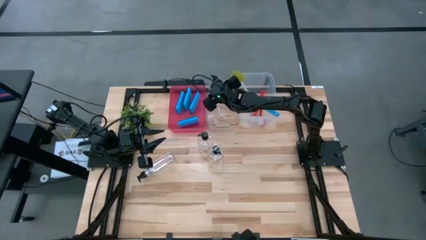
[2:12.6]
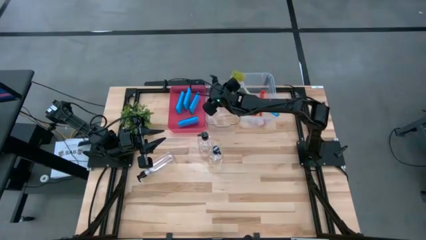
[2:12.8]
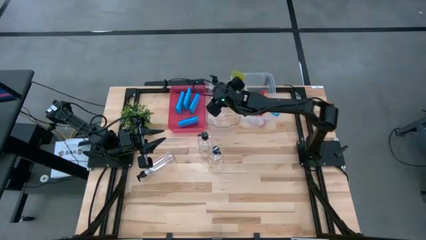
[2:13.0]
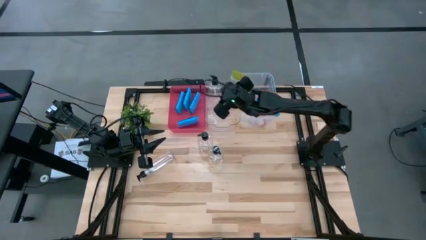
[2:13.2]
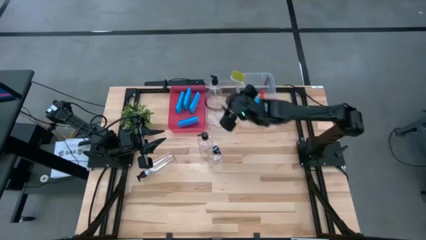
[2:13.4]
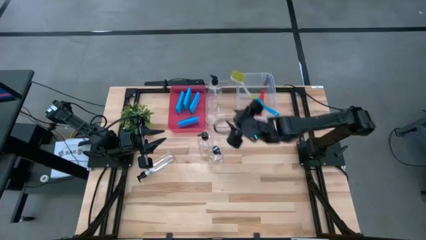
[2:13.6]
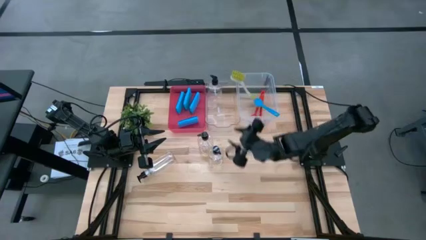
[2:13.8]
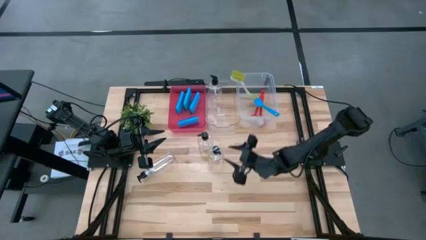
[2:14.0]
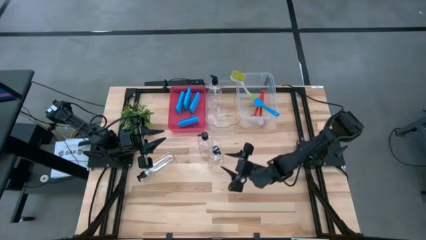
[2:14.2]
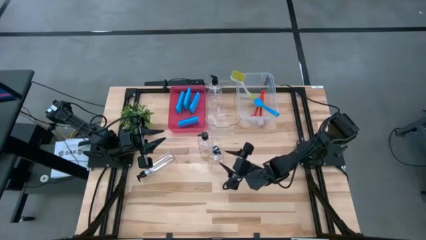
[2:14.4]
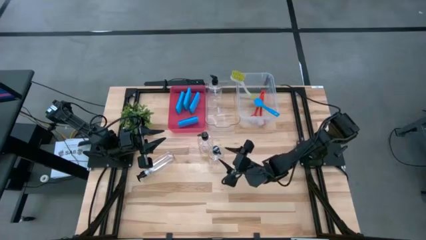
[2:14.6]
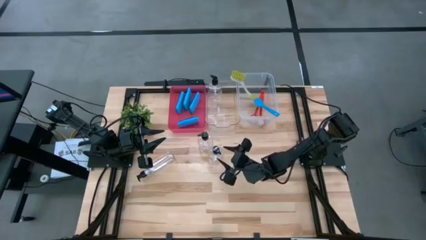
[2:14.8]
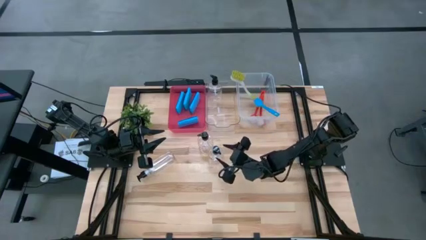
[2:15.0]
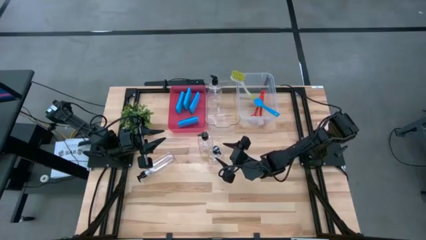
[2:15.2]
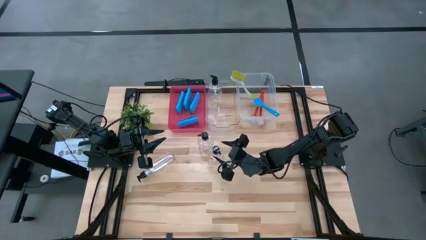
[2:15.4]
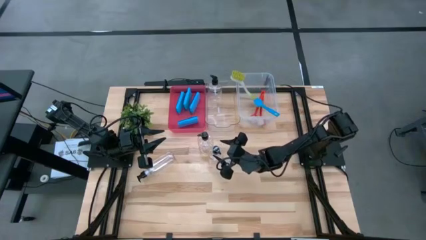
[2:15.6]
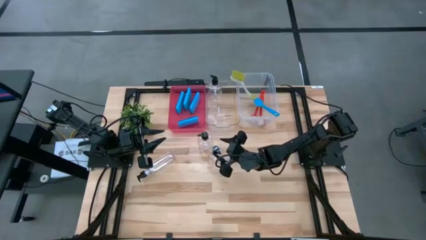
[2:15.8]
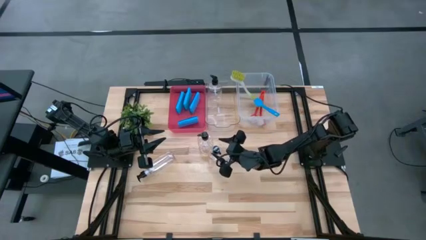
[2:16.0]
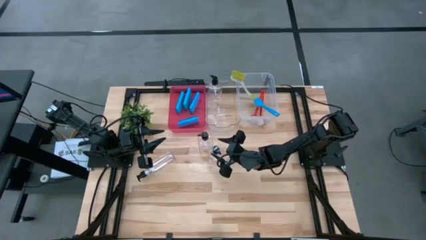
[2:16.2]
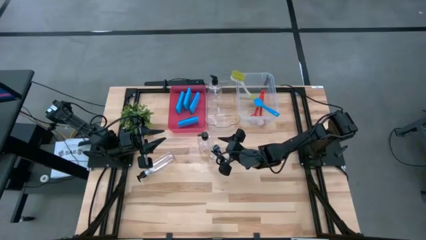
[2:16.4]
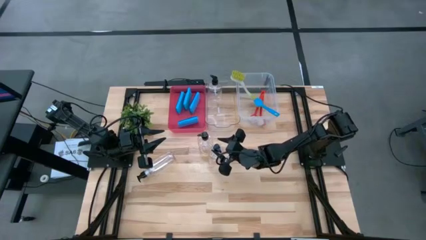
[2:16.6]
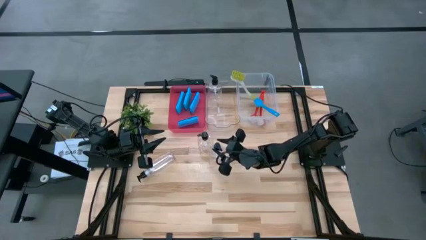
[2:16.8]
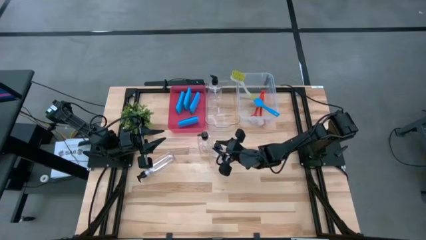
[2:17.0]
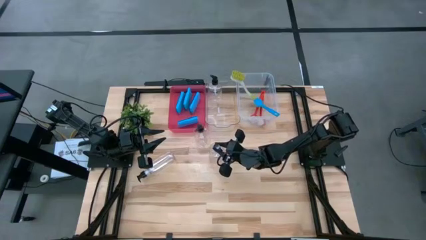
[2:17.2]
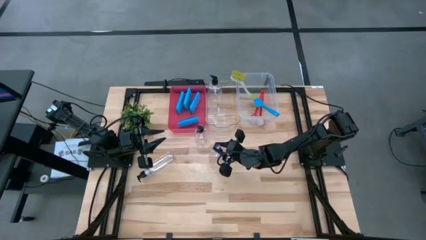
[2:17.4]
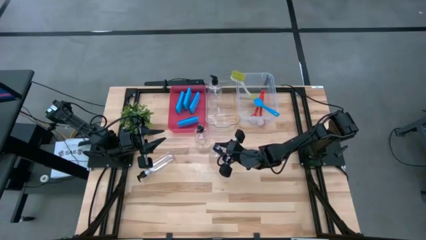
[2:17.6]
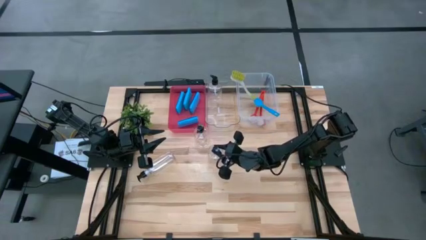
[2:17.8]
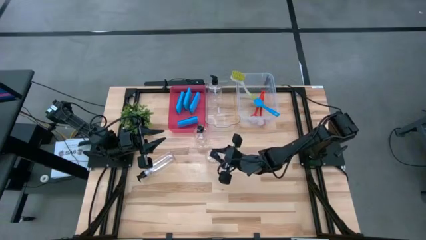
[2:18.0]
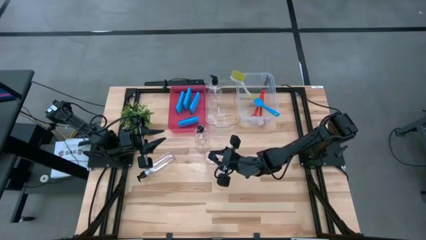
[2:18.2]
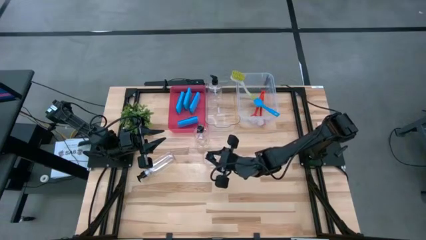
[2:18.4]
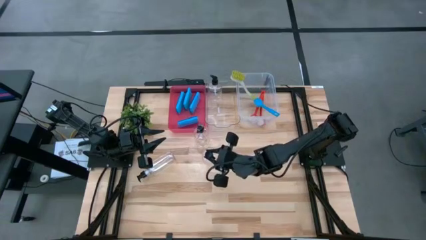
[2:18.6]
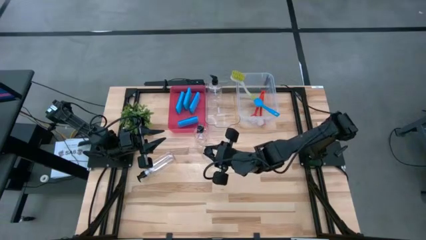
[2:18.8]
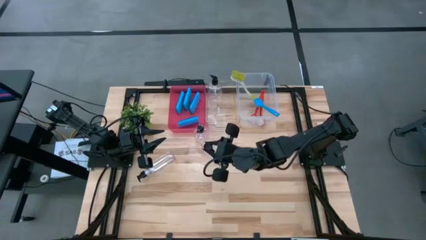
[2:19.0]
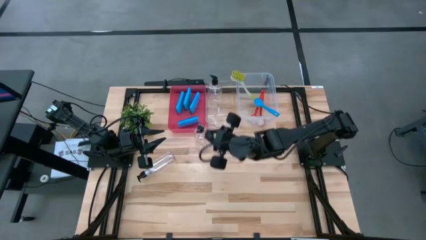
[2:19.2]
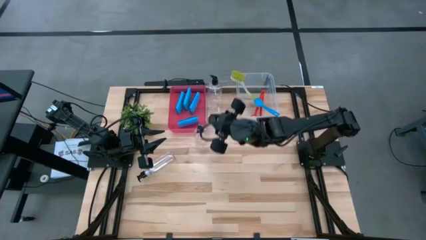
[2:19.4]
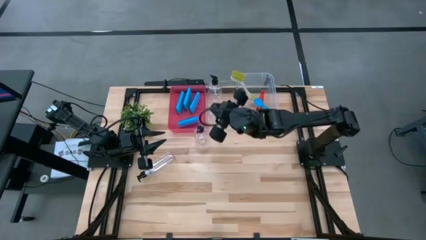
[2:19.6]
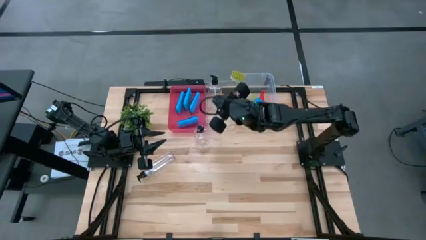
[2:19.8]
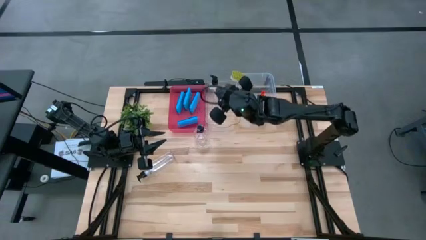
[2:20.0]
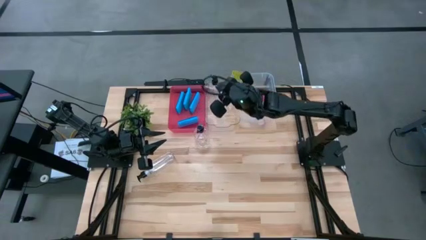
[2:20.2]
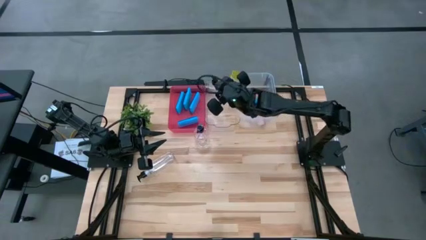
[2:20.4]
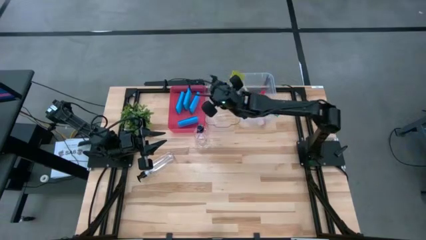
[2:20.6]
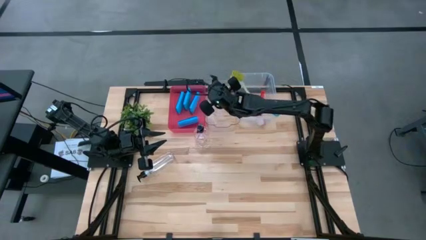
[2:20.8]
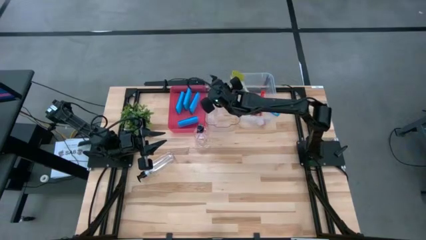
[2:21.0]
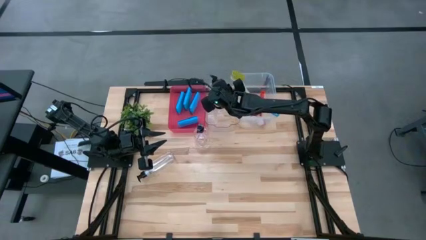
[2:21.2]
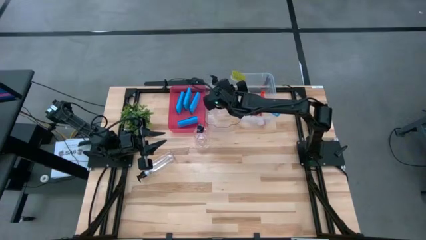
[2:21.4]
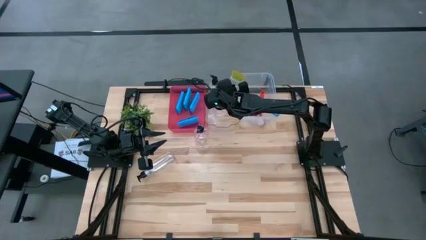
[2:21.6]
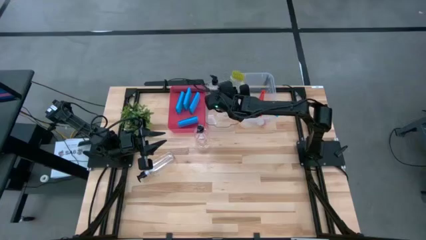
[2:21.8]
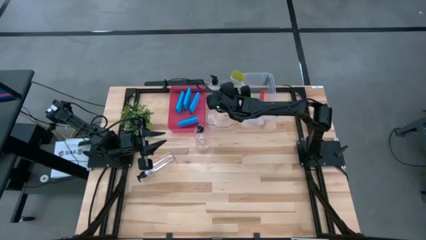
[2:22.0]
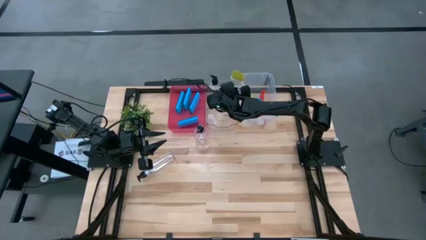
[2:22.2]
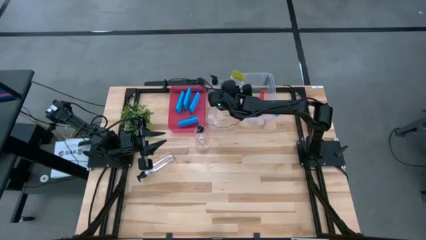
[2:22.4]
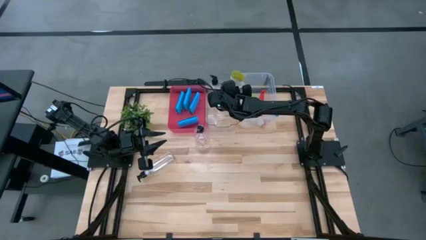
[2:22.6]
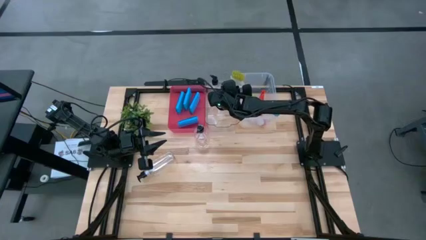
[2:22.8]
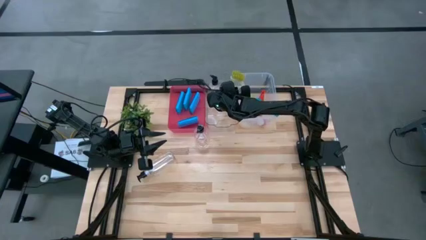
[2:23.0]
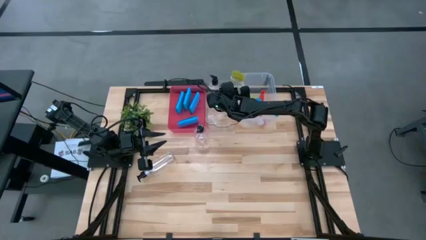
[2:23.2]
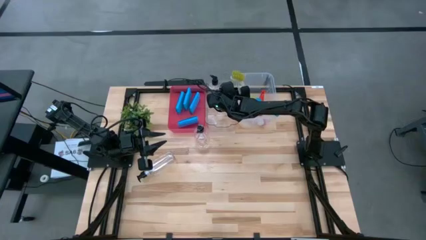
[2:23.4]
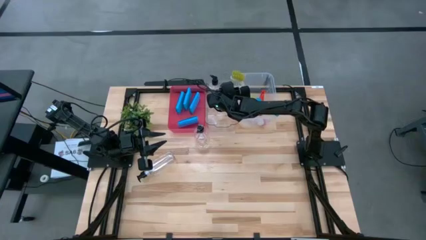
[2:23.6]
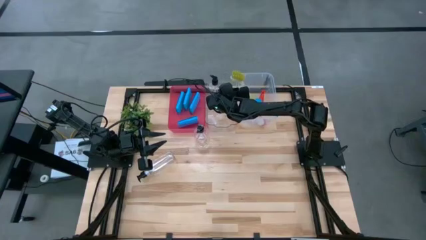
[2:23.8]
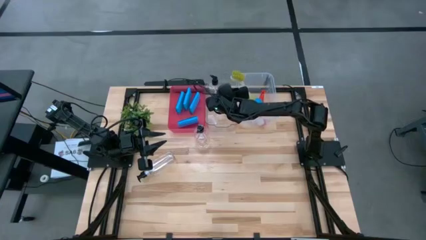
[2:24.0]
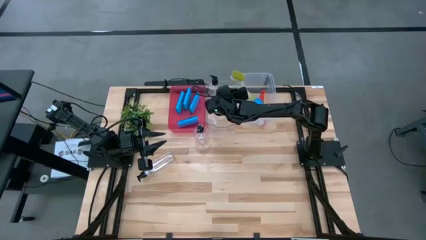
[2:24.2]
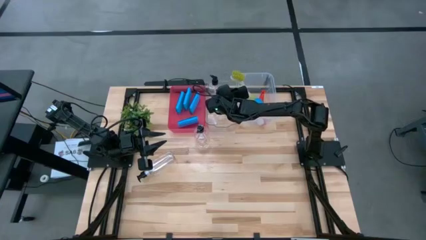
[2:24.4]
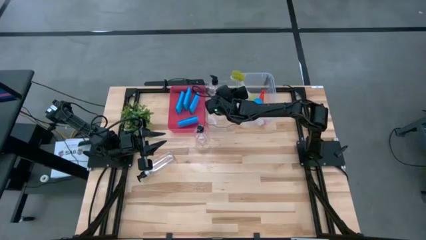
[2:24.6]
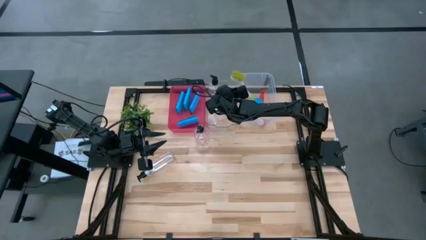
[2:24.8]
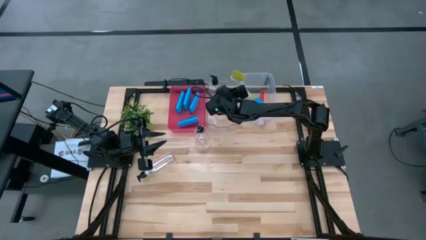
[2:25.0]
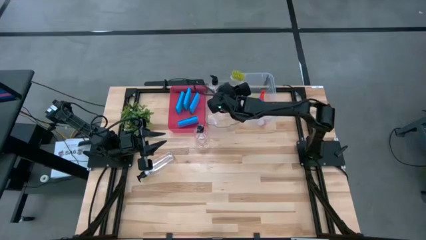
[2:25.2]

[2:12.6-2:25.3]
Task: Pick & Place Kitchen Sink Supplies
Put the spray bottle into the transparent bin

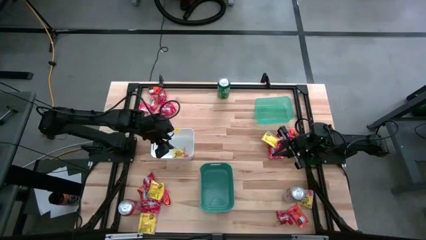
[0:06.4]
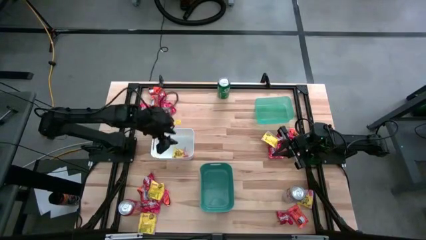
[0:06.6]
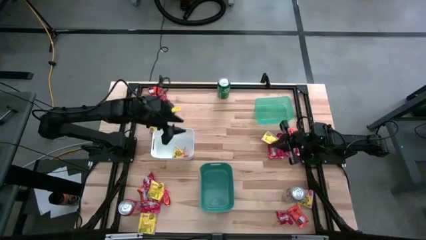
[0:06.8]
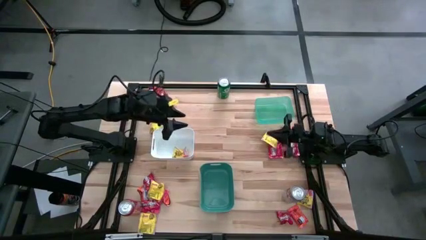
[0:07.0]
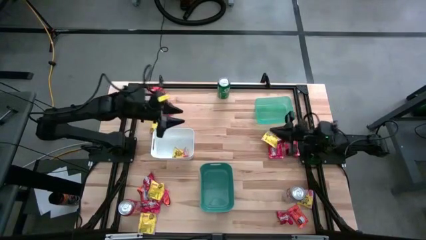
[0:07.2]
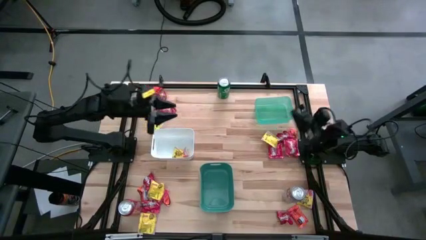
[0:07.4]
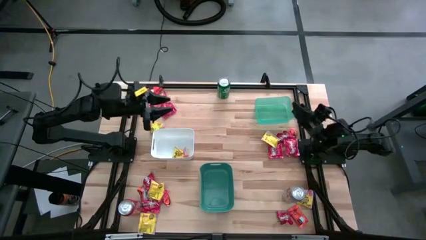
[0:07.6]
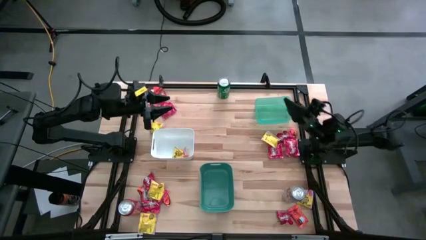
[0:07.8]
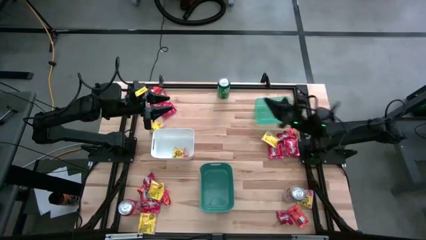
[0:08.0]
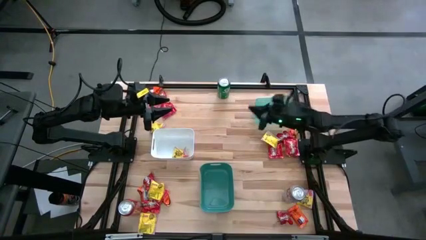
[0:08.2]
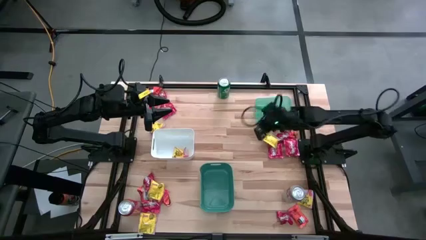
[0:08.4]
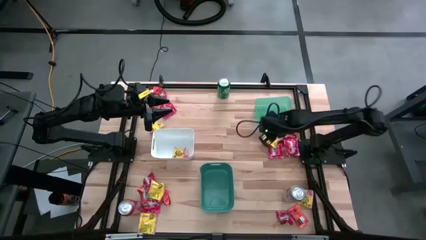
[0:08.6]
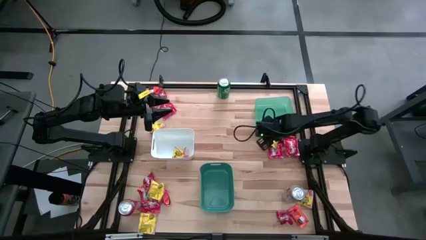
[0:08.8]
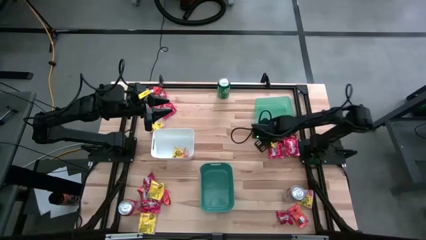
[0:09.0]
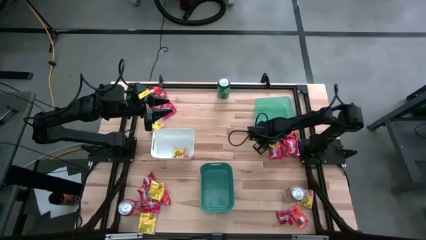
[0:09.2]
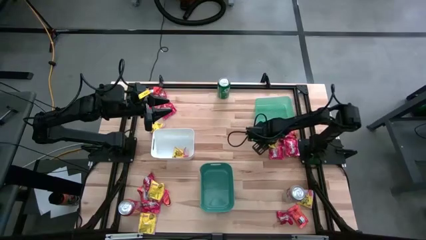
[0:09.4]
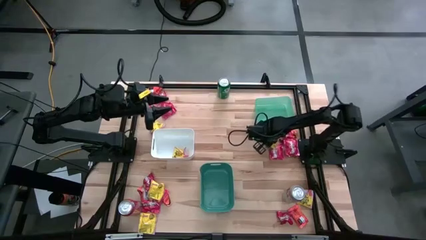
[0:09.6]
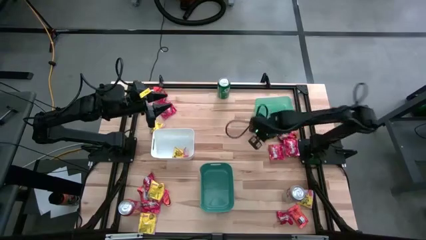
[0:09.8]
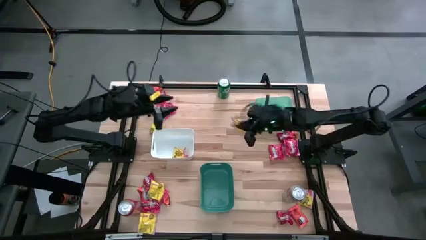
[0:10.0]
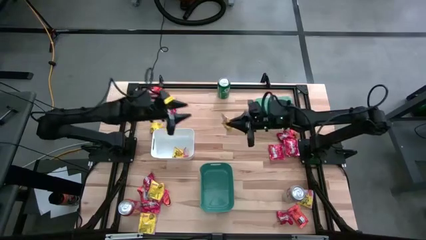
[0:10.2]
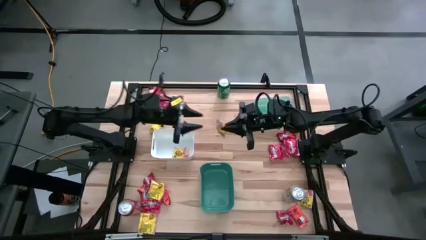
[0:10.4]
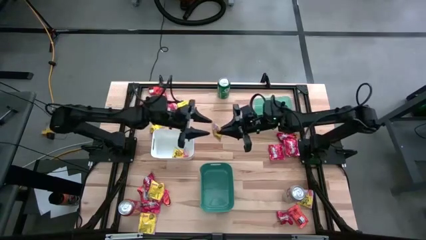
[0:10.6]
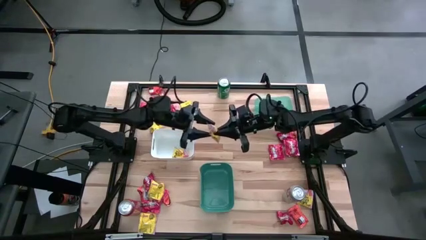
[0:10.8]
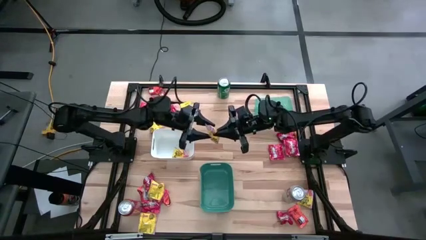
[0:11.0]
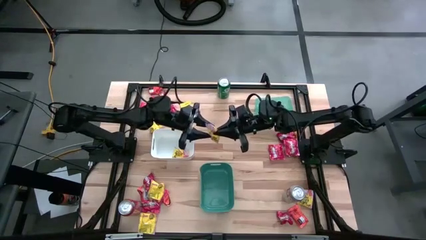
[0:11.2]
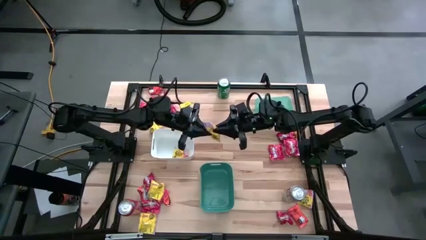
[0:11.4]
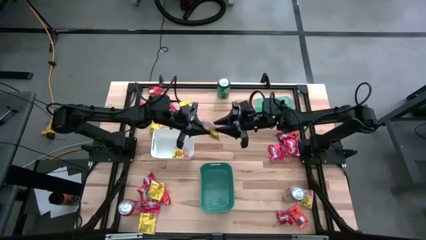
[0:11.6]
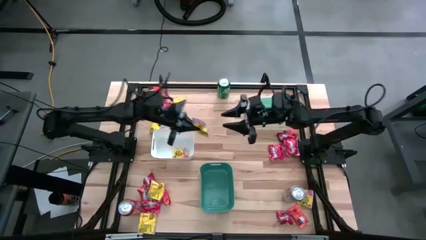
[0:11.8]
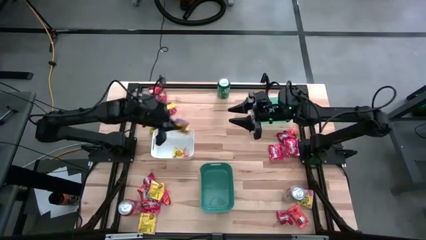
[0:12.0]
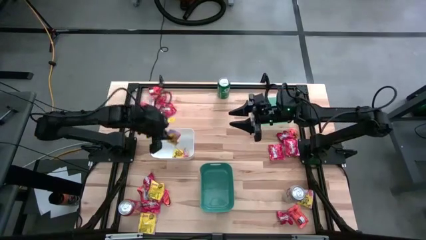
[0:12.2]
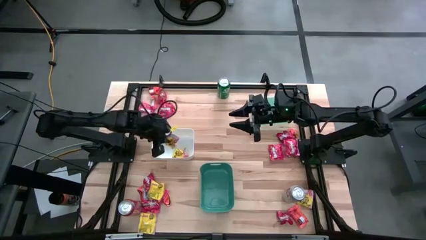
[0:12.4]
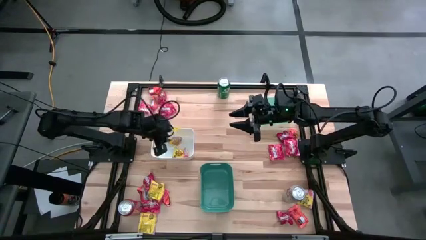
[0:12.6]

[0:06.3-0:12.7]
Task: Sort candy
Put the yellow candy pack into the white bin
